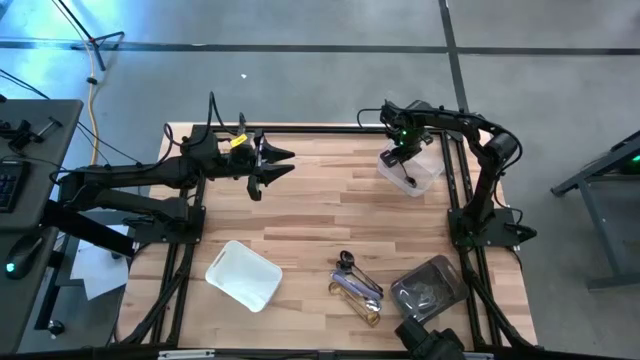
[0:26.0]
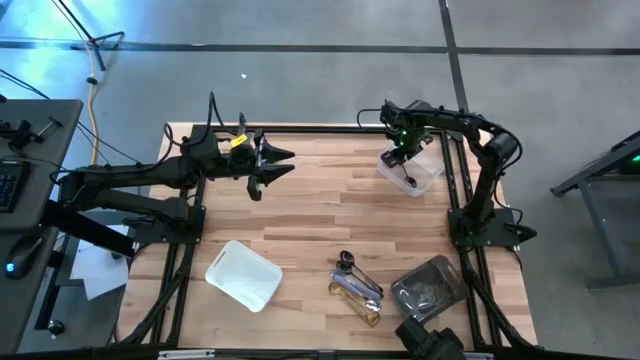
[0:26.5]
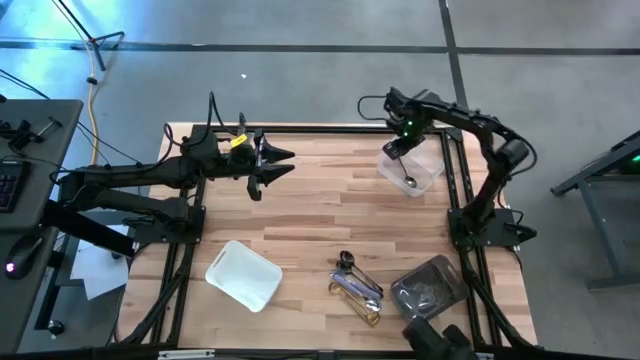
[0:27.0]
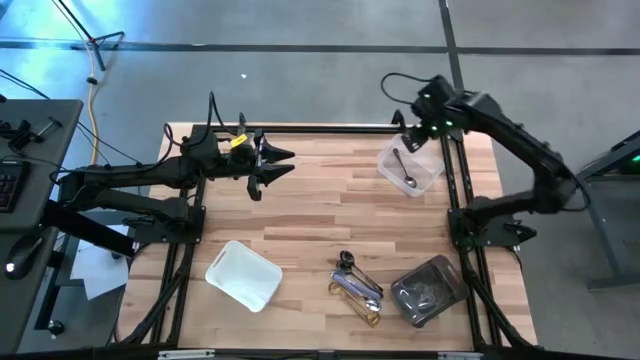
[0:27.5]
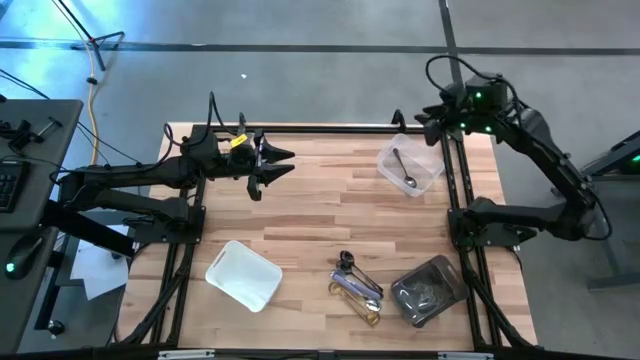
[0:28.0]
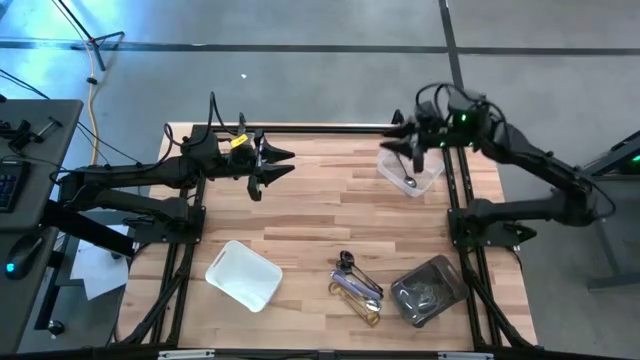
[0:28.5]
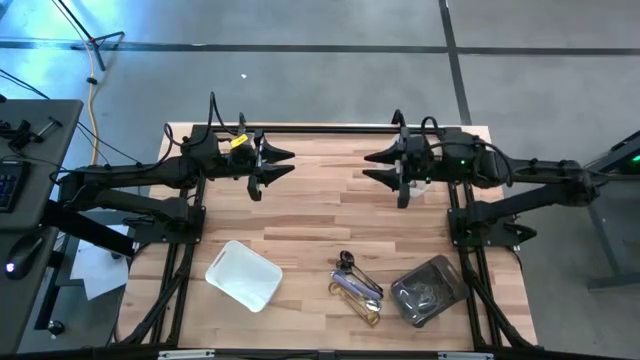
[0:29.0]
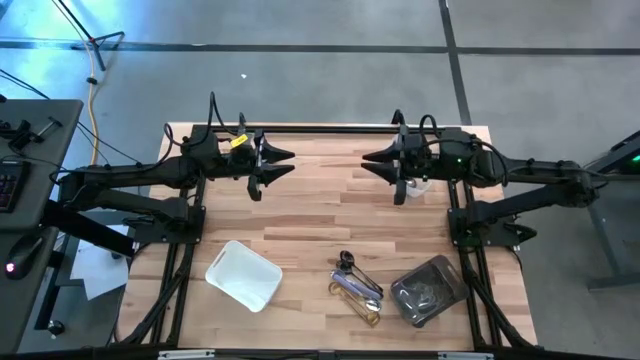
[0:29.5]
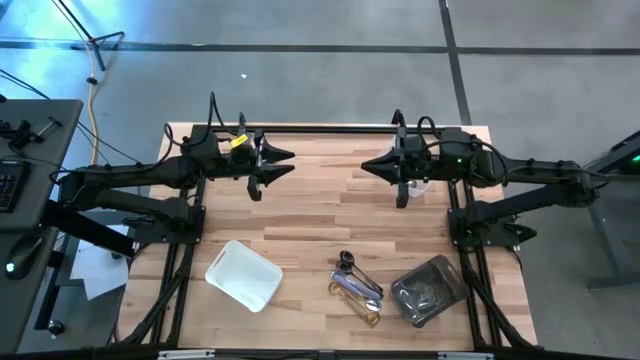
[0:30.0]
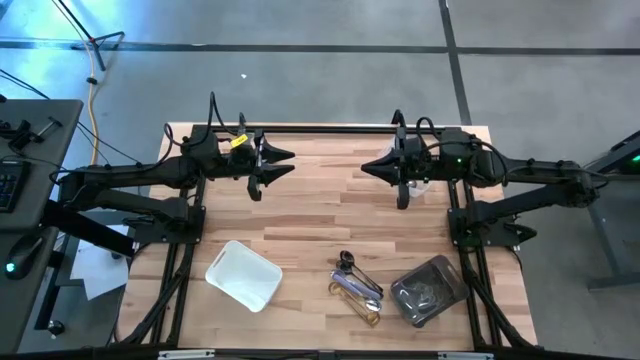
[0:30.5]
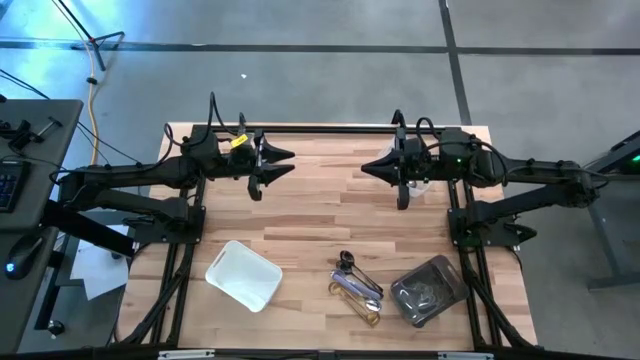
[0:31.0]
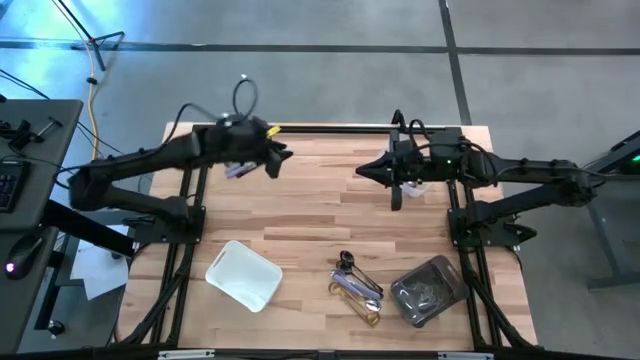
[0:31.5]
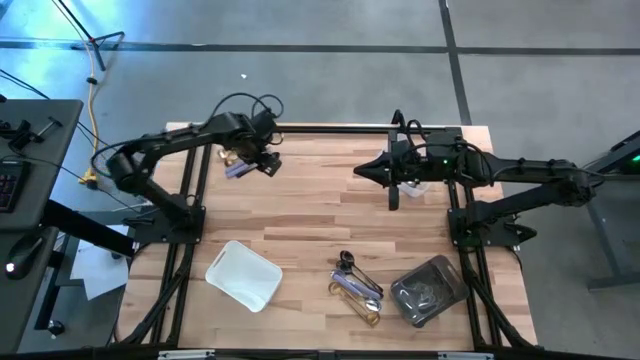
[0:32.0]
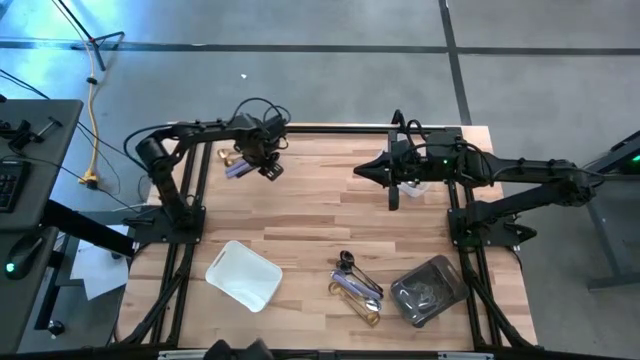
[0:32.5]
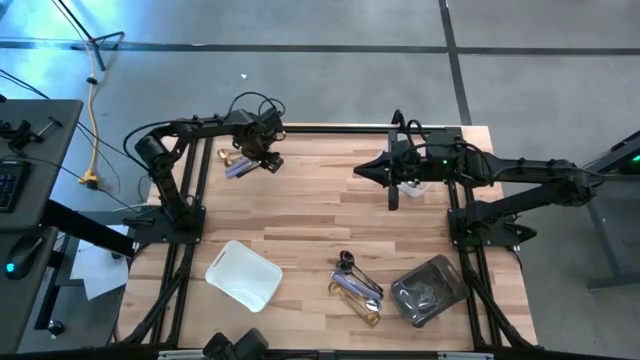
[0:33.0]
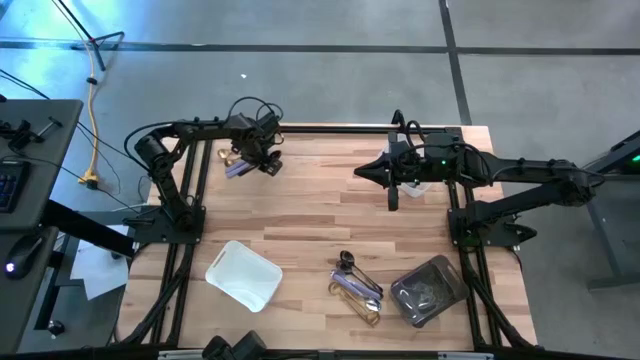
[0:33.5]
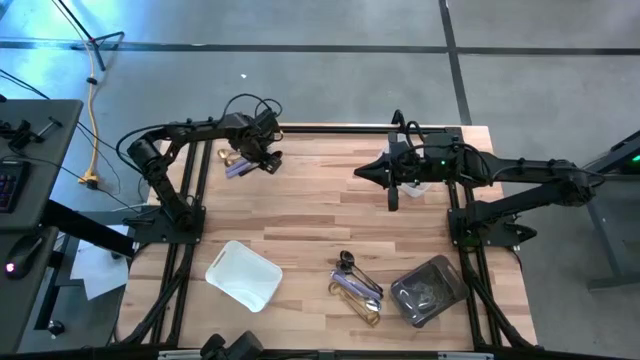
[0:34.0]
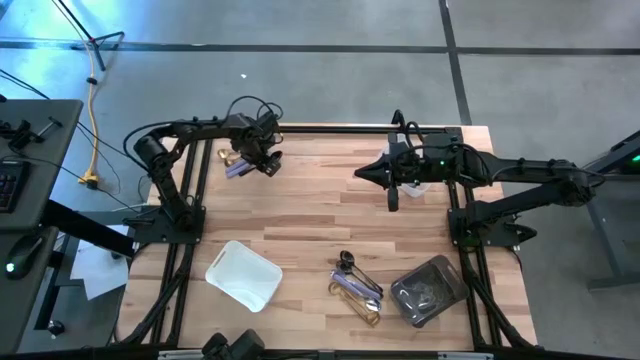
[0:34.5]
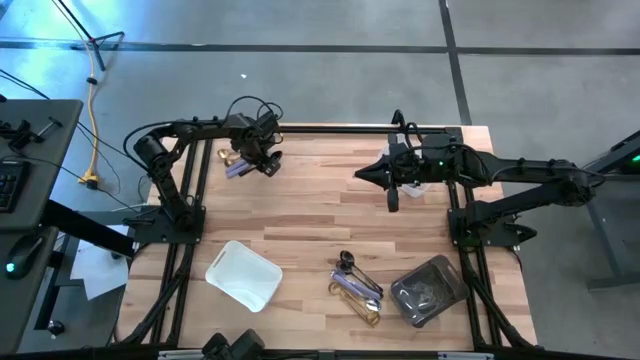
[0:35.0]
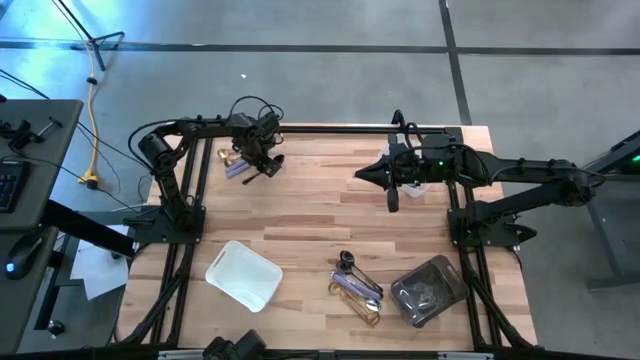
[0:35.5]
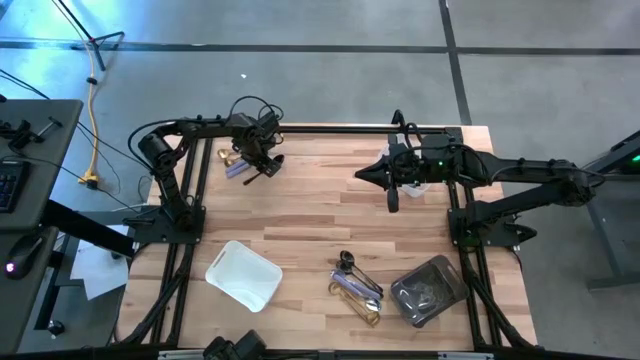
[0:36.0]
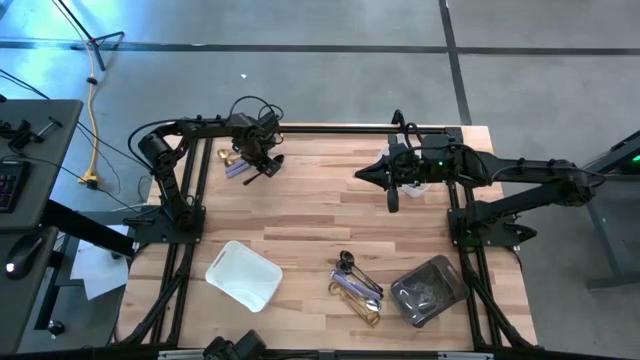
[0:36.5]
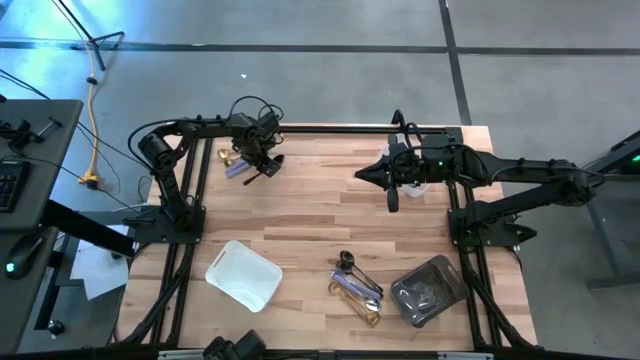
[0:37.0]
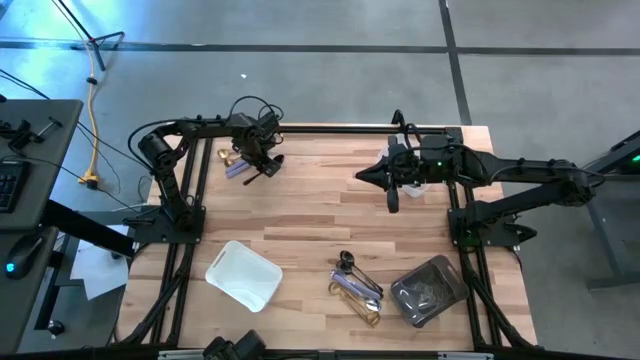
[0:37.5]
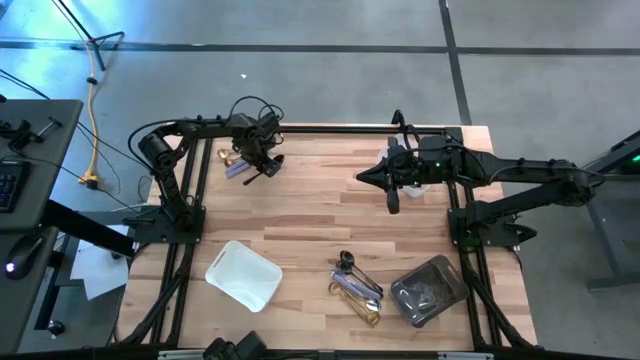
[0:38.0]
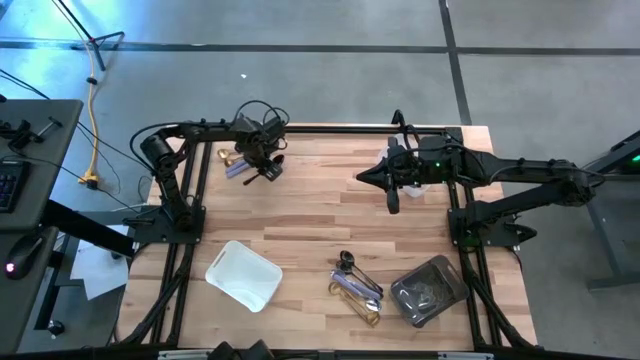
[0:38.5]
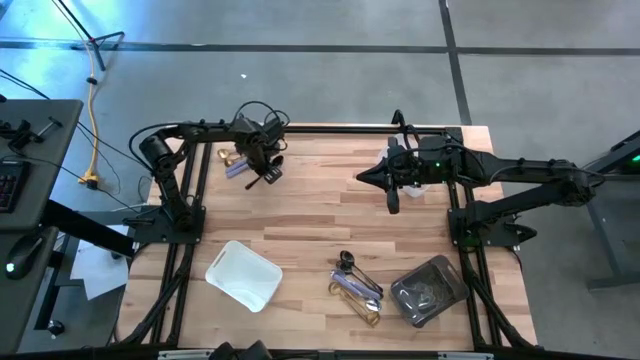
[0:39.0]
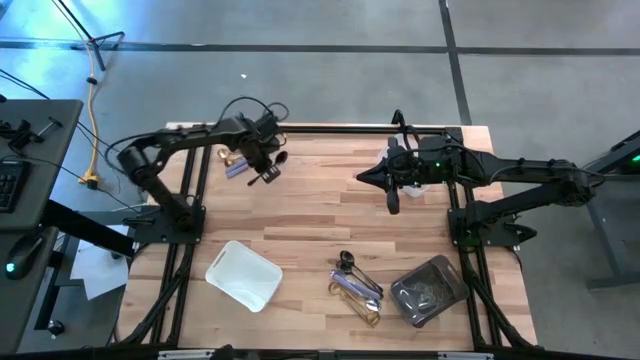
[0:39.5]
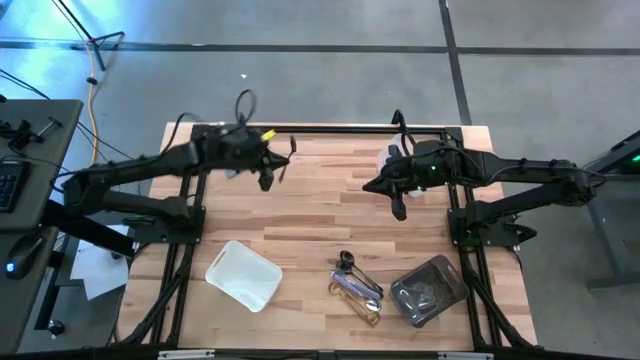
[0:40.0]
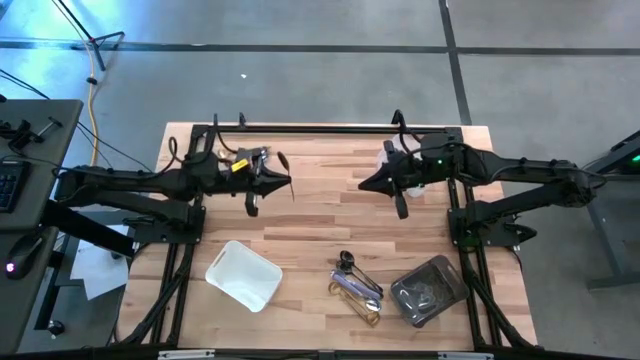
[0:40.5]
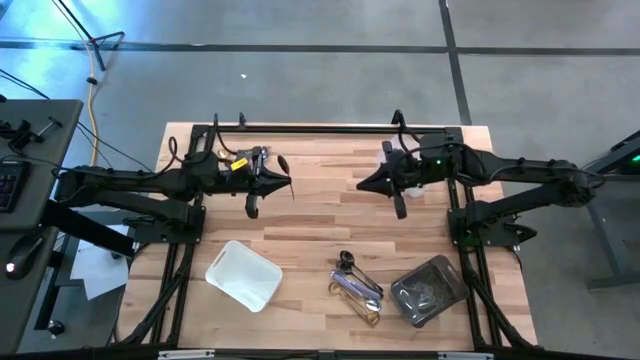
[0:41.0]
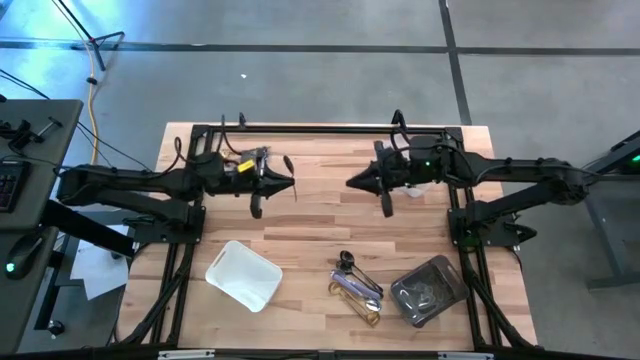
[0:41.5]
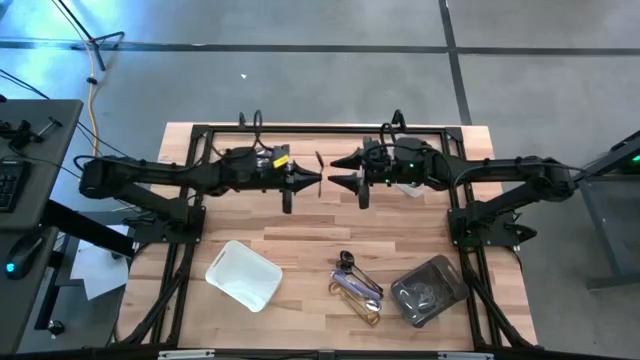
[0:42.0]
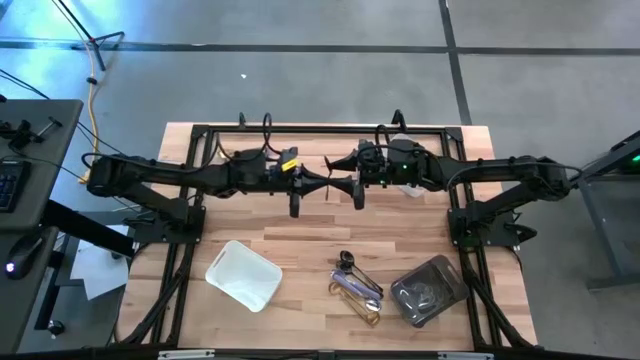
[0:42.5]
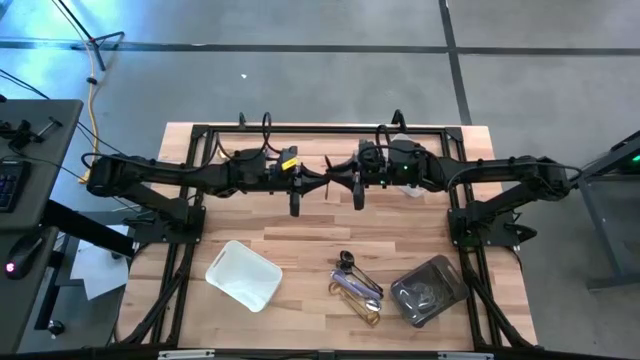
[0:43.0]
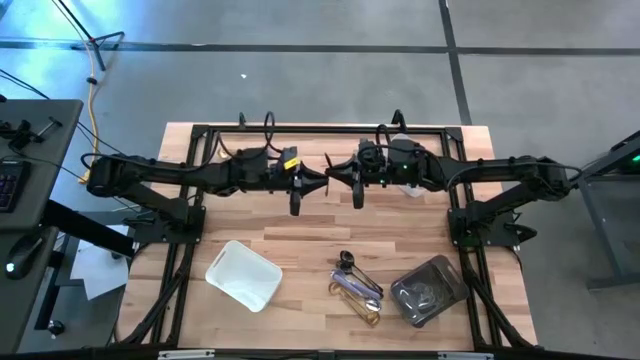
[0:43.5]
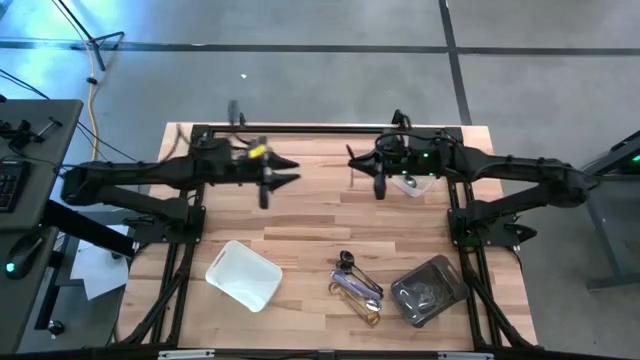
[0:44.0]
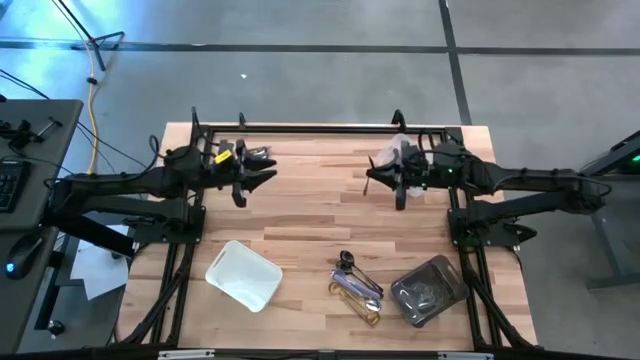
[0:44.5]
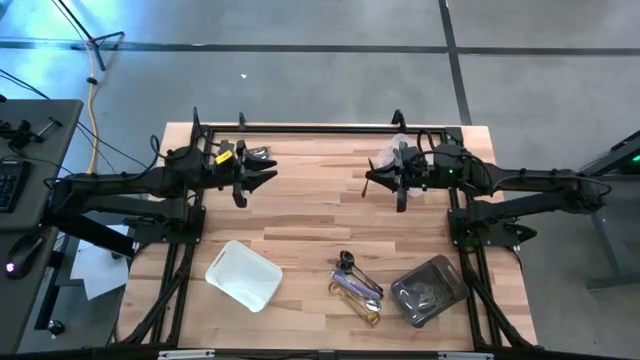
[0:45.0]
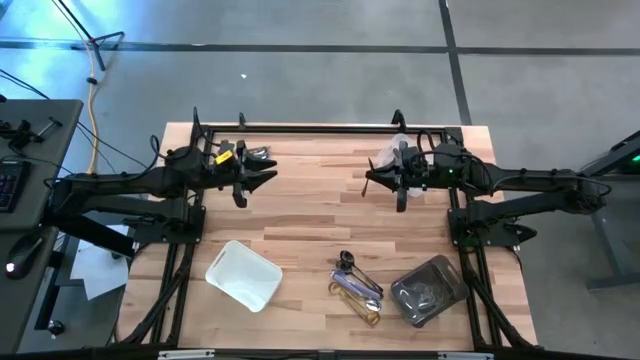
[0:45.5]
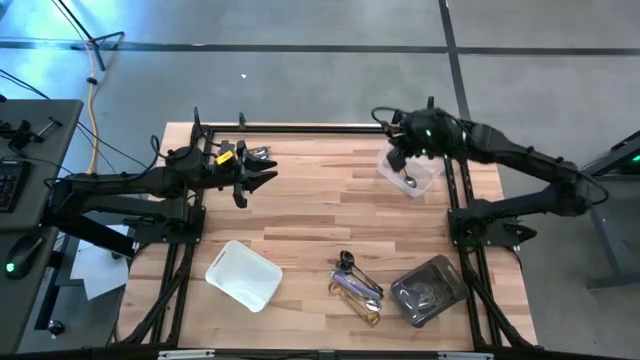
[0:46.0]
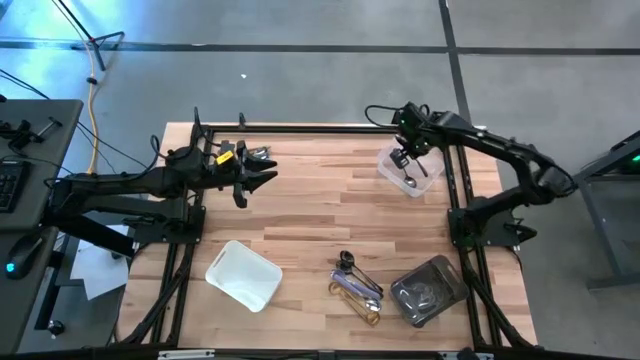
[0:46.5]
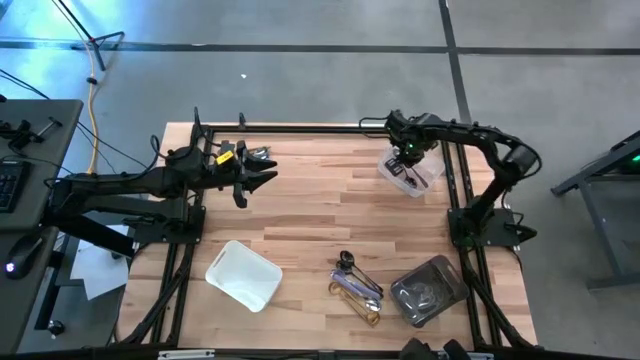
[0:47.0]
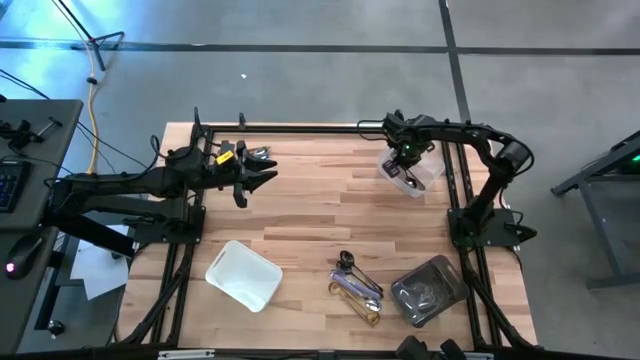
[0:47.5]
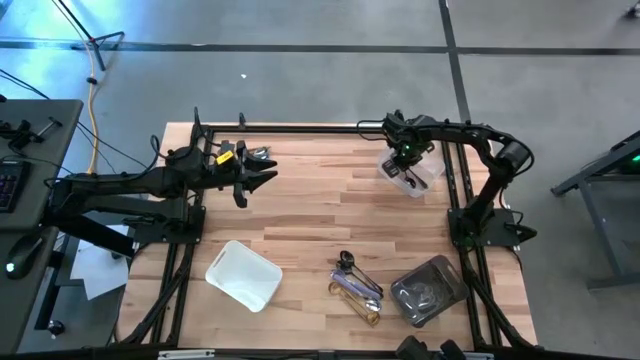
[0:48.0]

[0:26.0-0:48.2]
Task: Sort silverware by color (type)
Put the black spoon into the transparent bin
